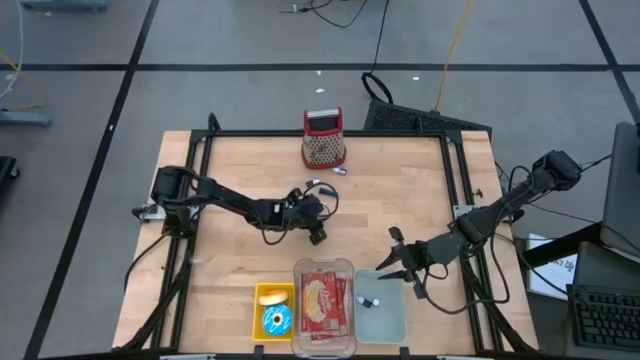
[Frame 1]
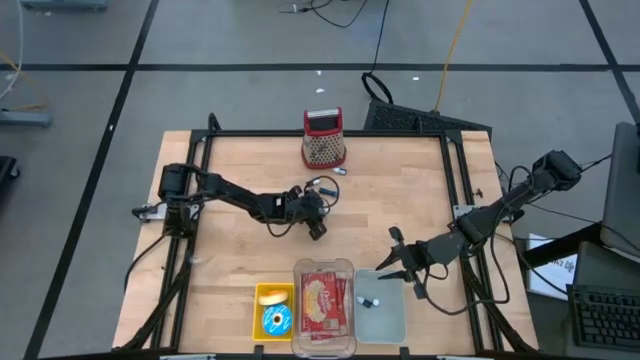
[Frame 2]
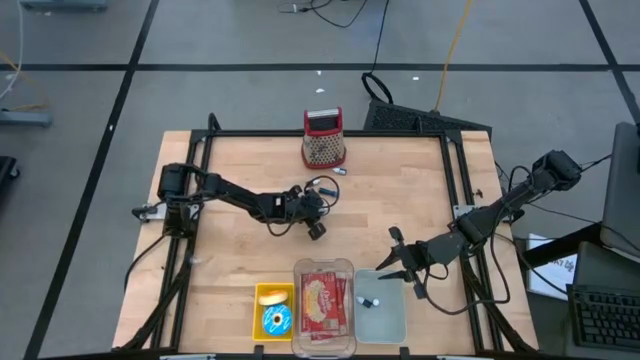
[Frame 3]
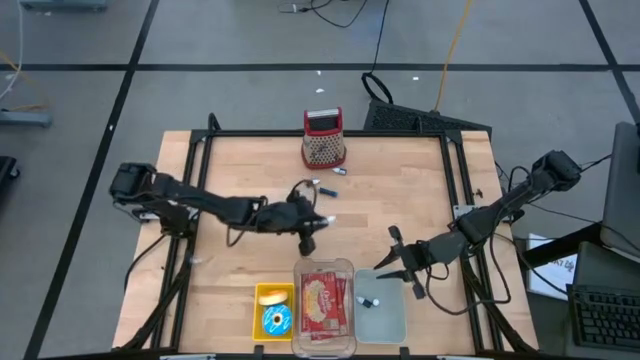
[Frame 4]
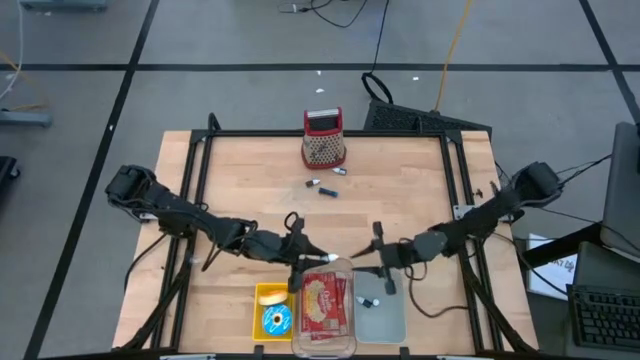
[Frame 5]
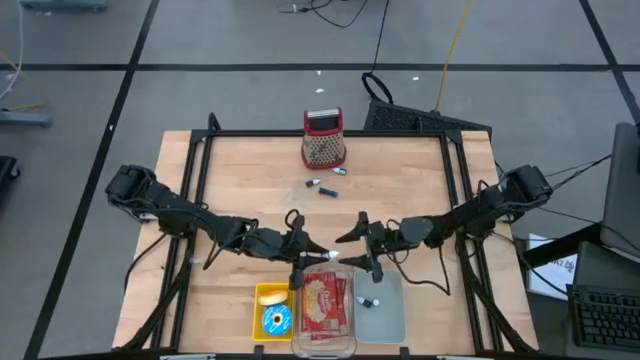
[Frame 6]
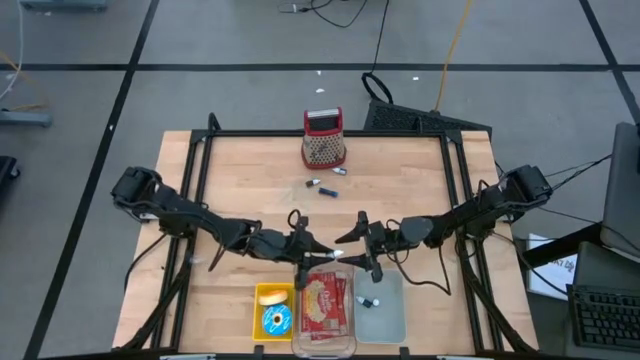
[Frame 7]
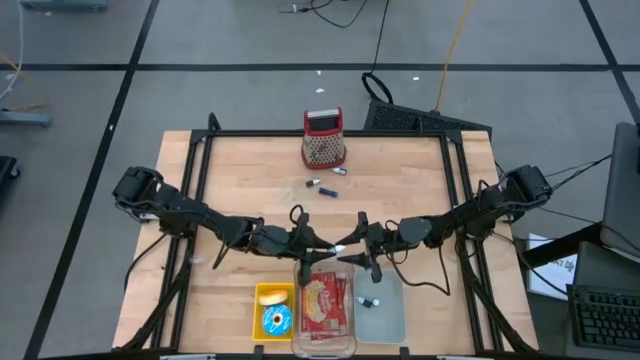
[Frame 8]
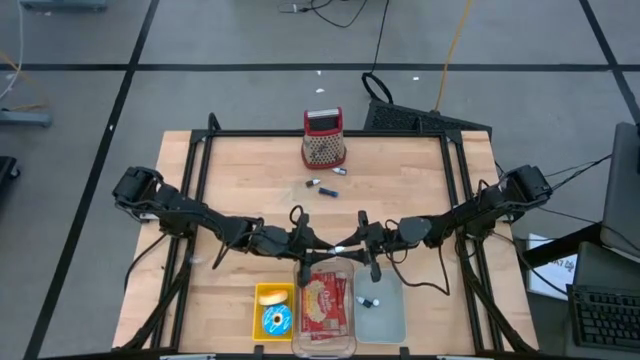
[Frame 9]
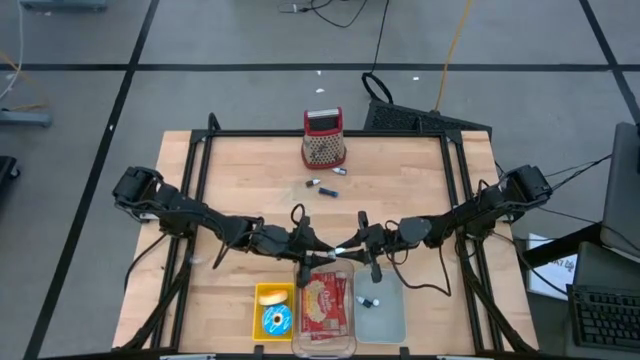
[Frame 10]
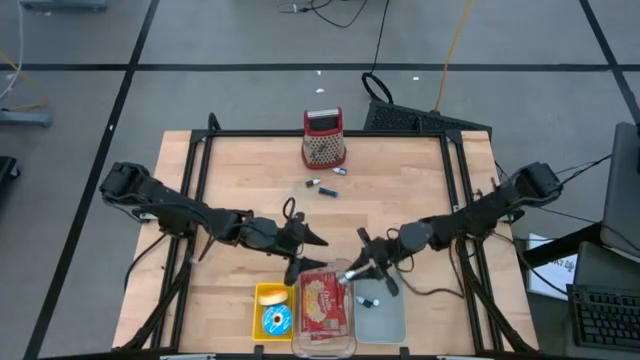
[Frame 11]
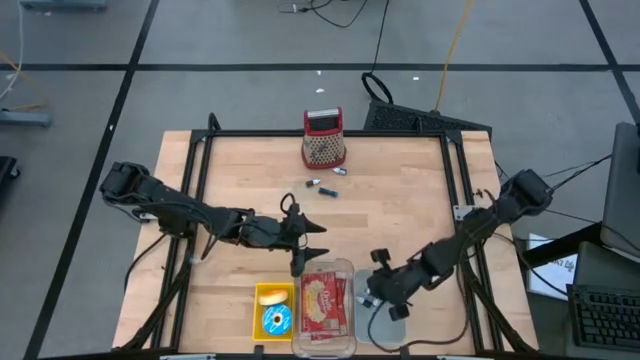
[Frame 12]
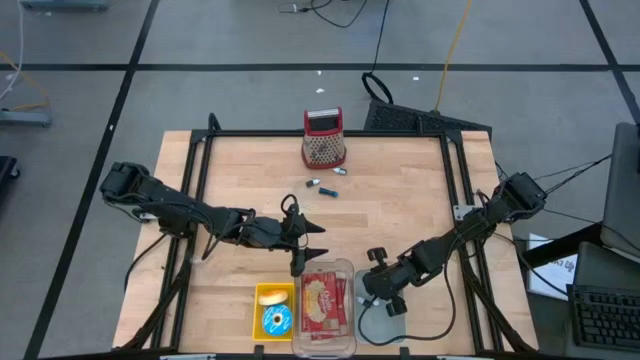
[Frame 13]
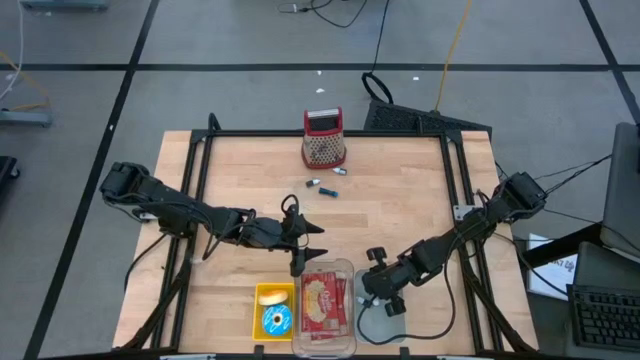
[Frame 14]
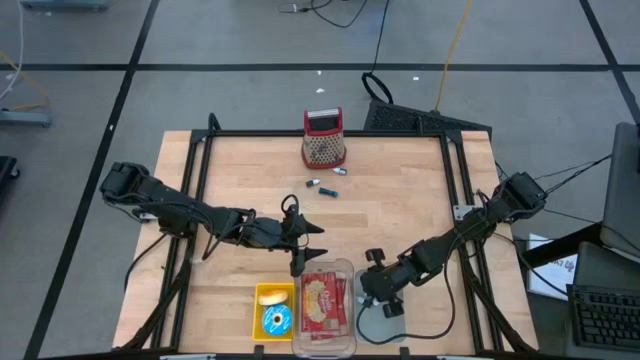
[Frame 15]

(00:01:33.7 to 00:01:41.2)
Put the green food coloring bottle into the gray bin

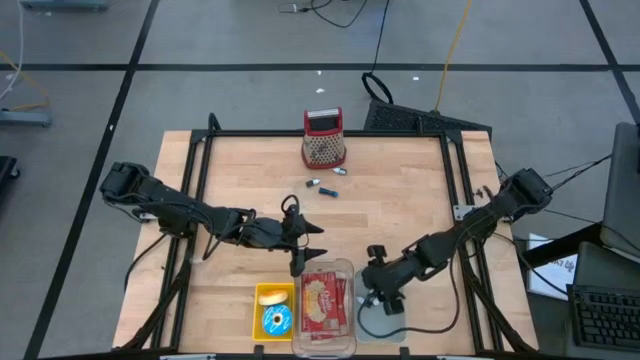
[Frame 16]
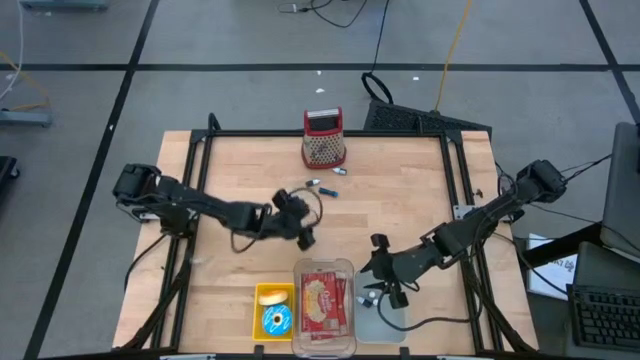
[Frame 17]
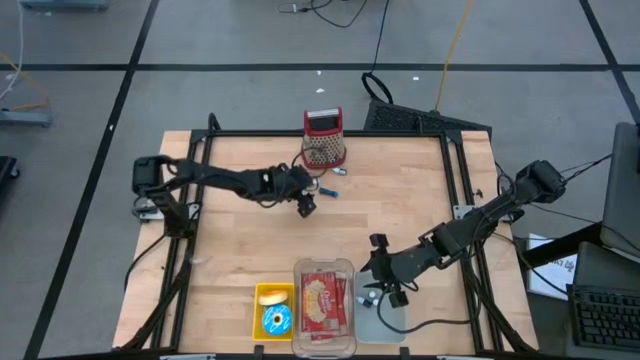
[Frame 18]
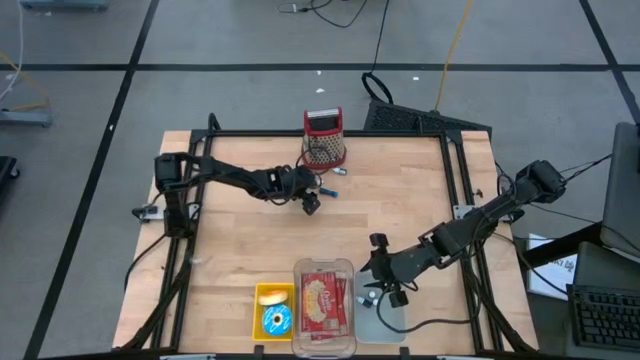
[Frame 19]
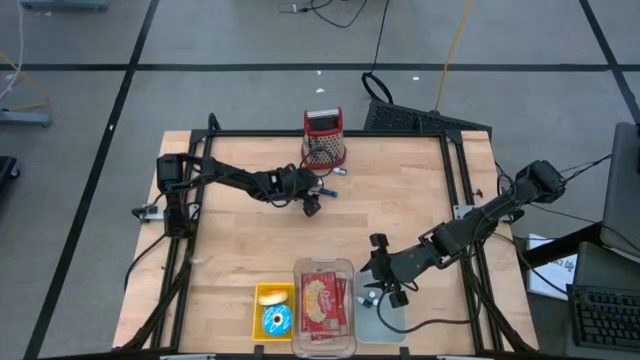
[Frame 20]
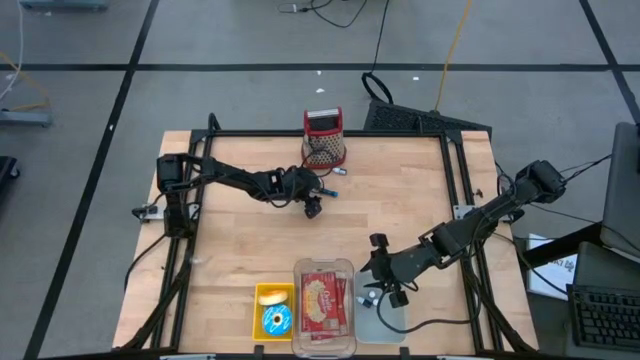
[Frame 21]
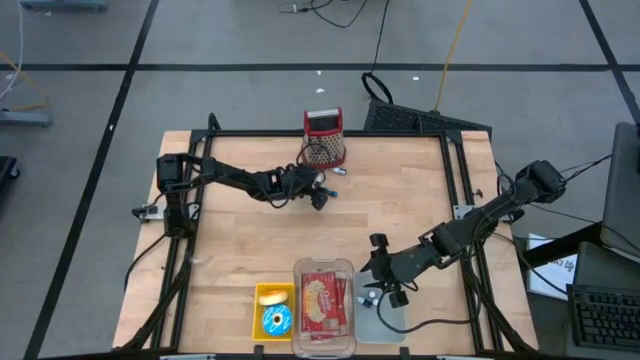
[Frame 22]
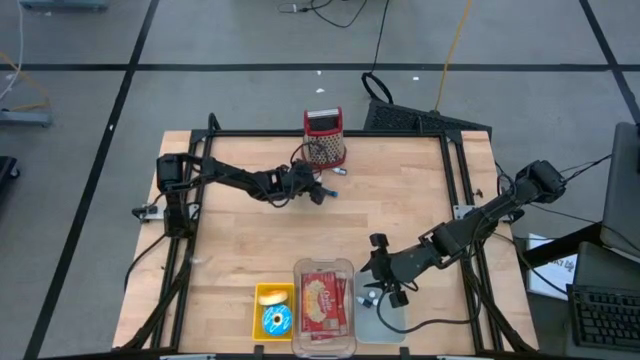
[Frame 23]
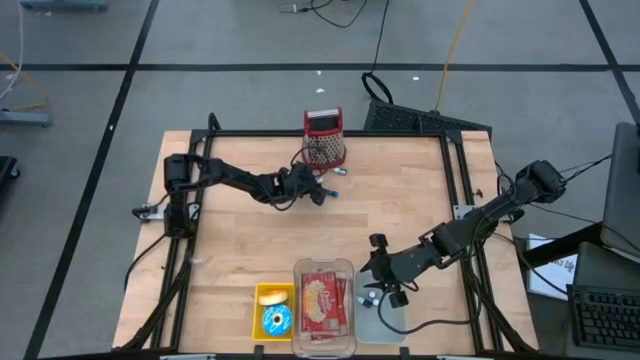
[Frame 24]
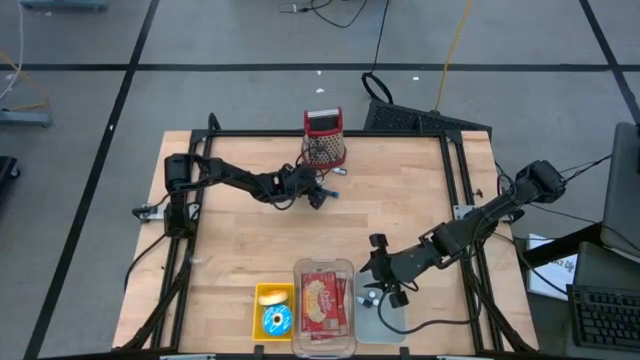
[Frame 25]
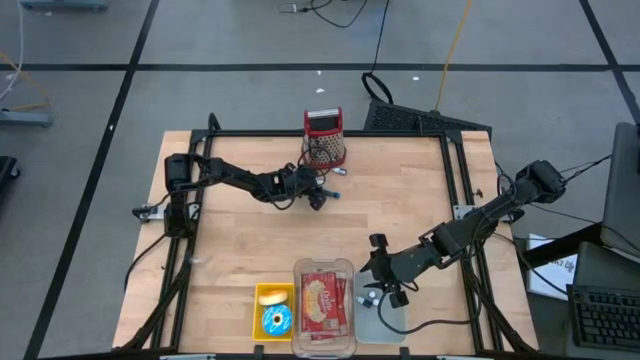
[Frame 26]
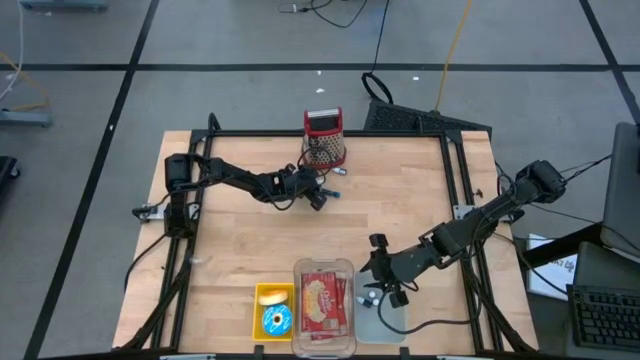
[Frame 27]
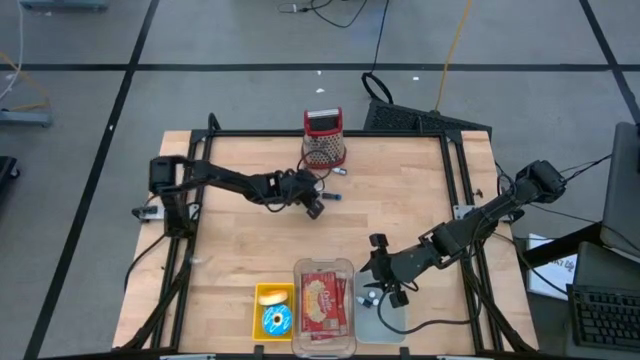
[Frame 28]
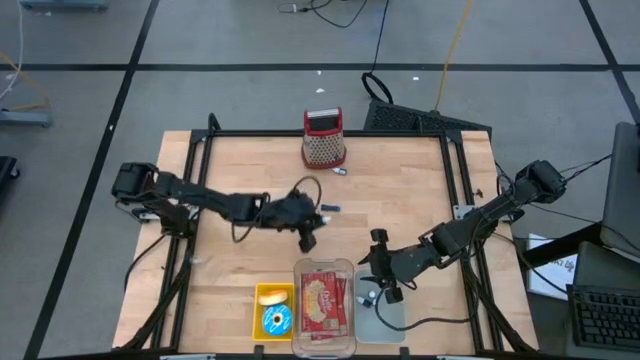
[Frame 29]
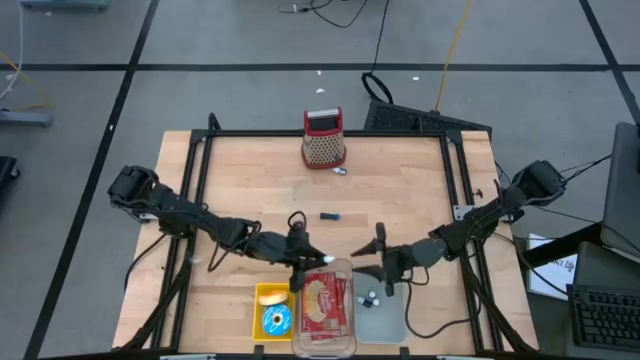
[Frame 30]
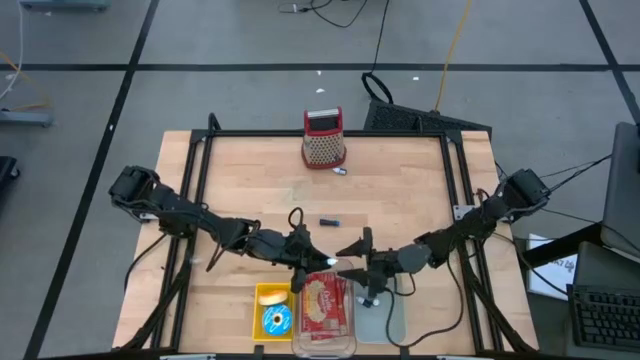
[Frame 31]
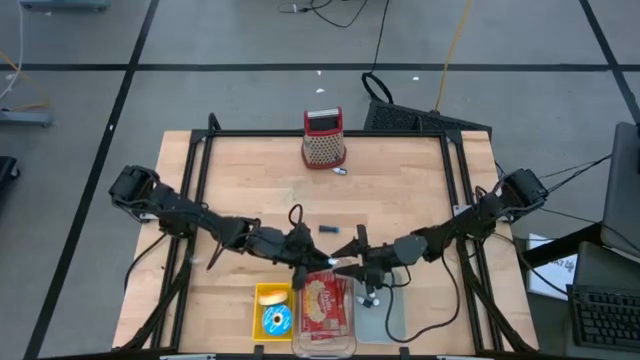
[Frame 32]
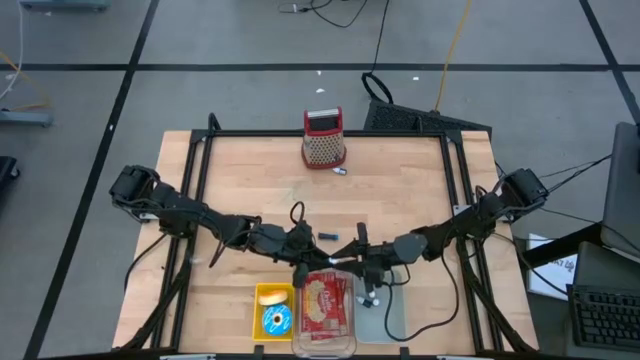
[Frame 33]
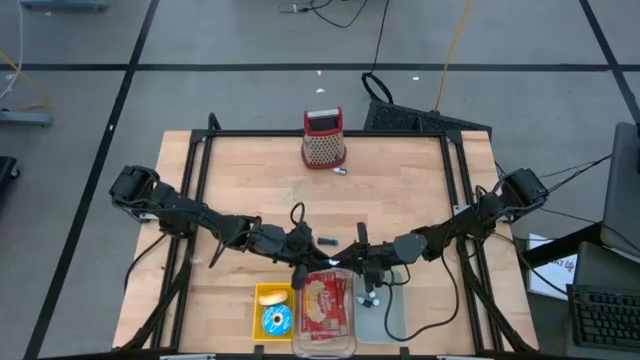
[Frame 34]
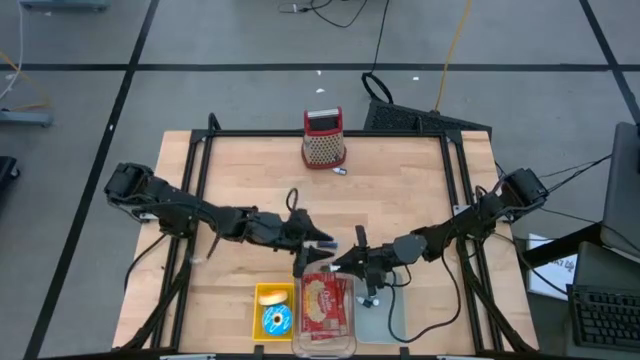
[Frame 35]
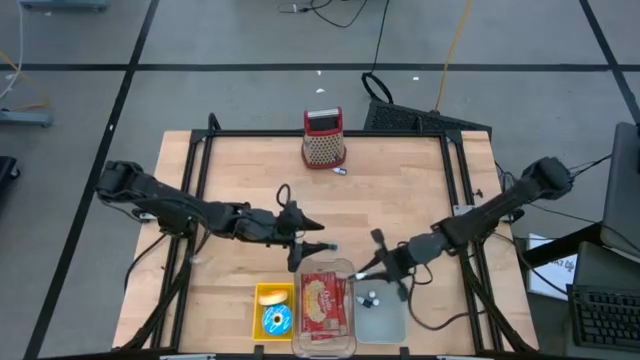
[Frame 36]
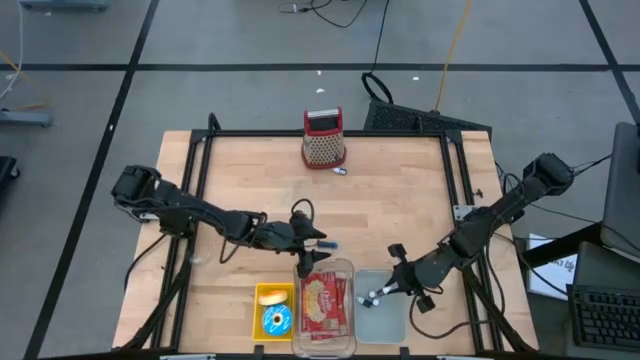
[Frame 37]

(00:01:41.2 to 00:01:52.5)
Put the brown food coloring bottle into the gray bin
